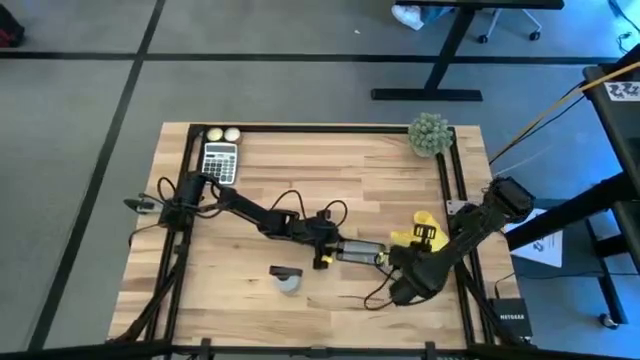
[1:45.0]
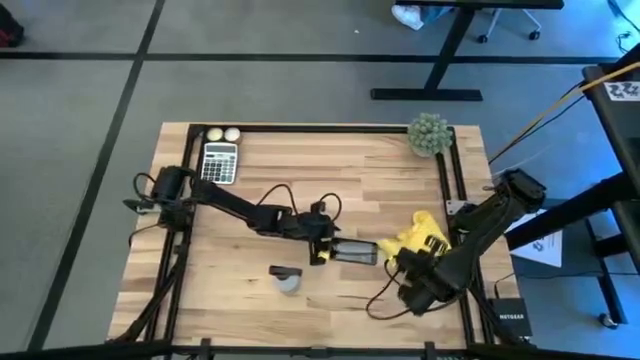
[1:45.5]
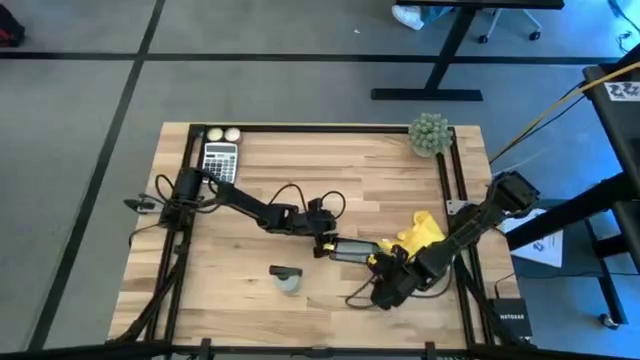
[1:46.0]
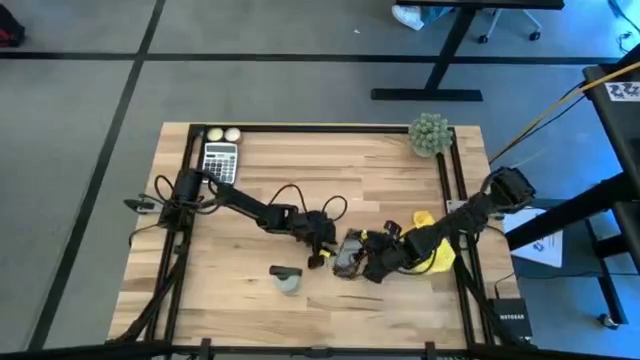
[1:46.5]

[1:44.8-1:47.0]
Task: Apply microfiber cloth
Adjust the black cellphone on the table

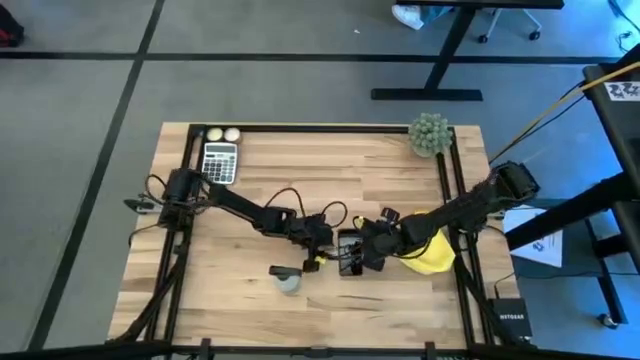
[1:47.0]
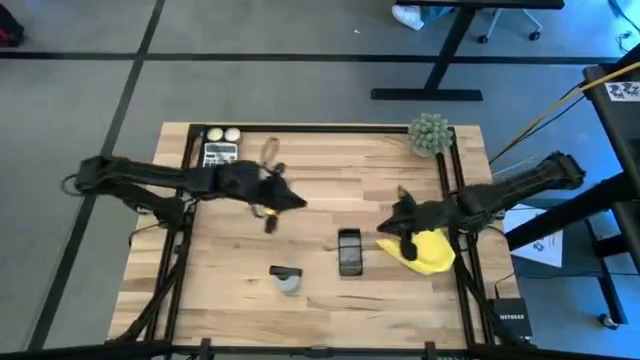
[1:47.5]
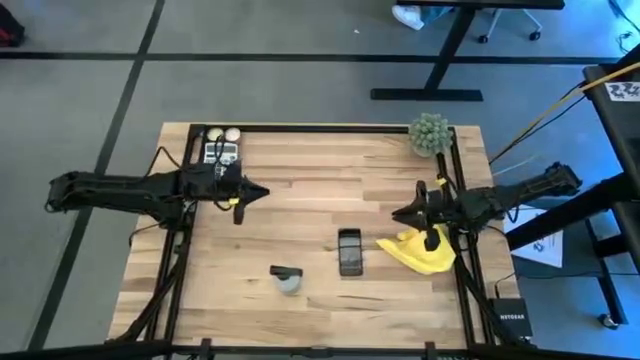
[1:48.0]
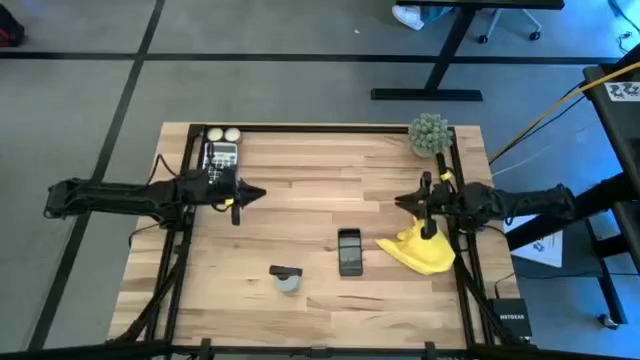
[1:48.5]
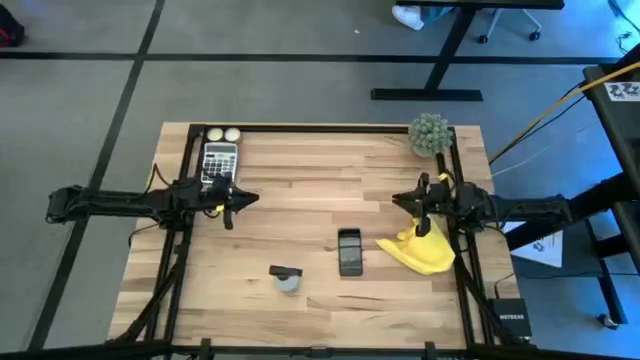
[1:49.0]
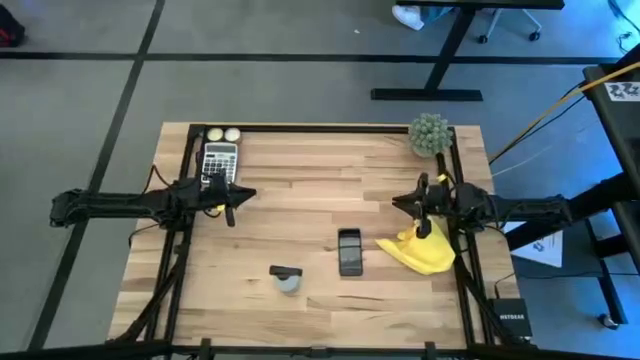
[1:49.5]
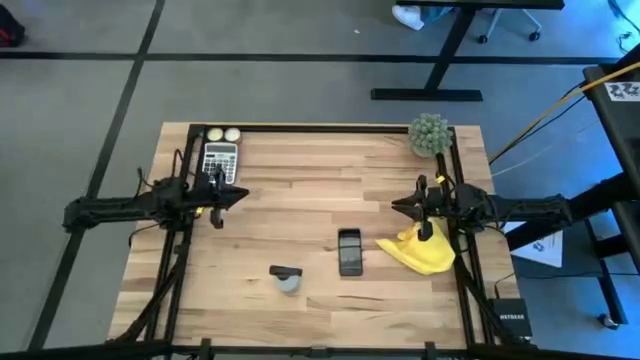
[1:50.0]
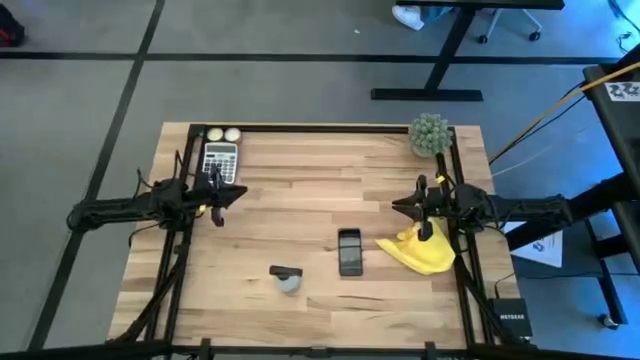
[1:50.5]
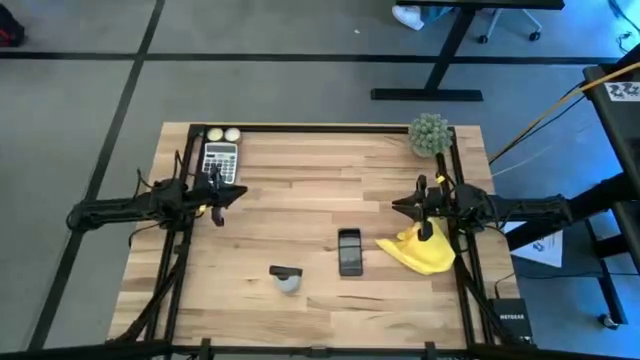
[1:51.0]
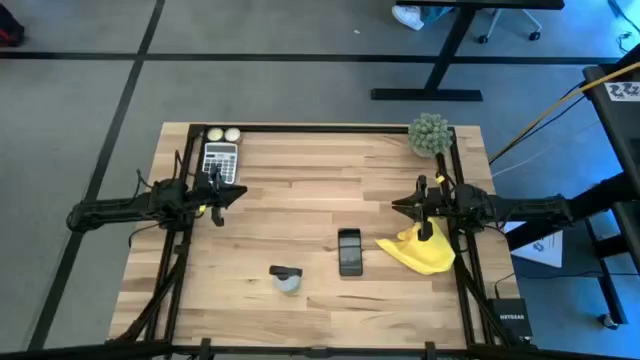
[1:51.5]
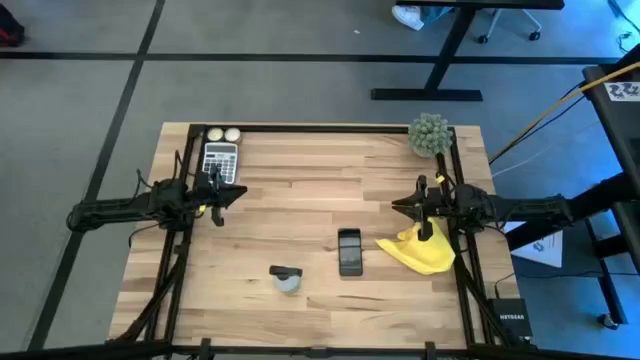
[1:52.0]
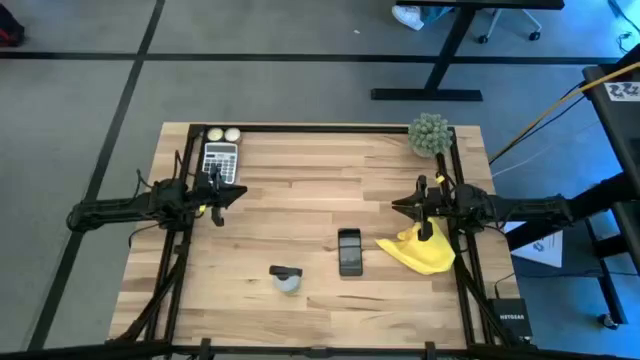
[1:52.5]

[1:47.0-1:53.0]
Return to Home Position

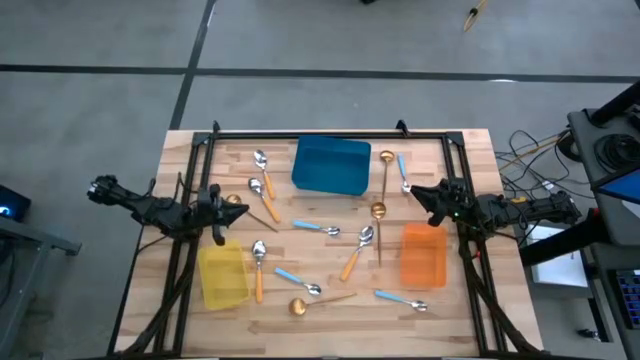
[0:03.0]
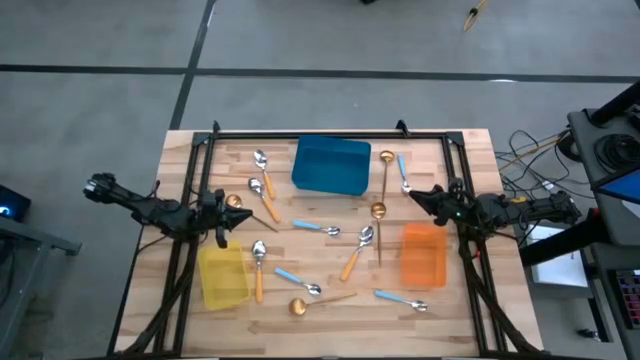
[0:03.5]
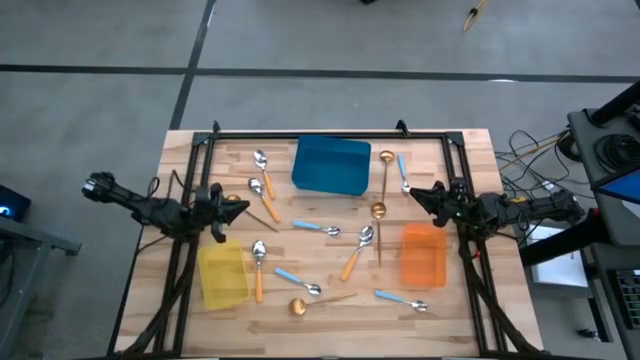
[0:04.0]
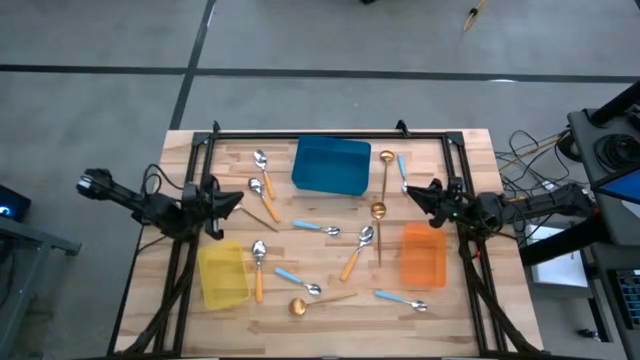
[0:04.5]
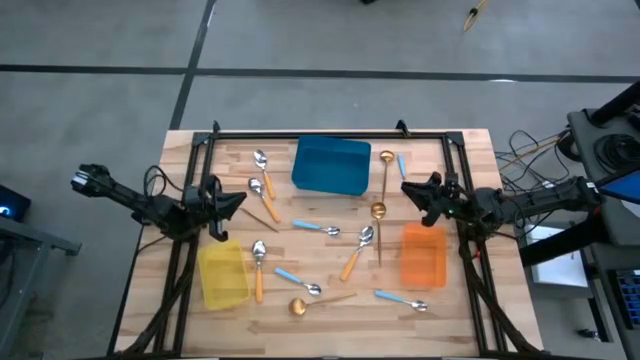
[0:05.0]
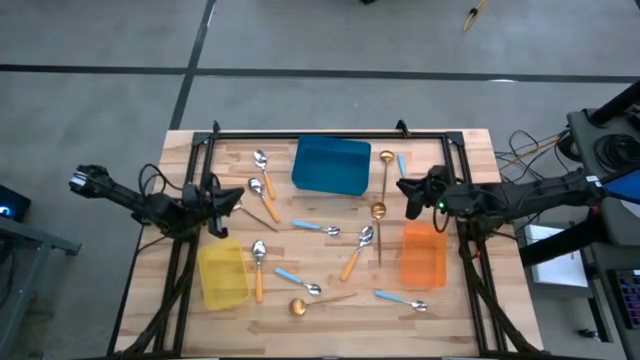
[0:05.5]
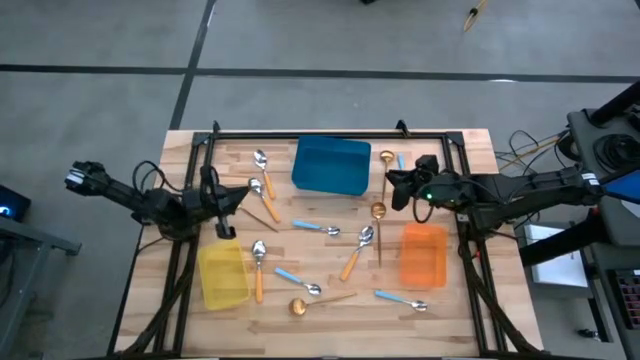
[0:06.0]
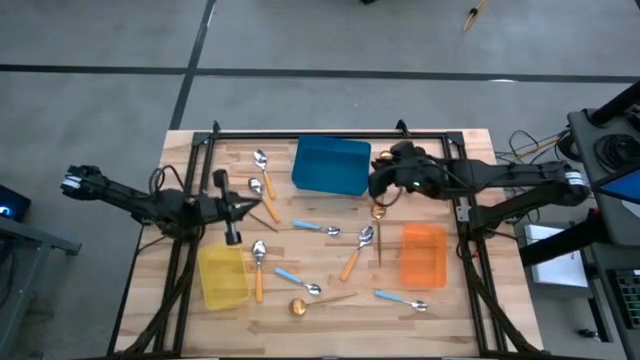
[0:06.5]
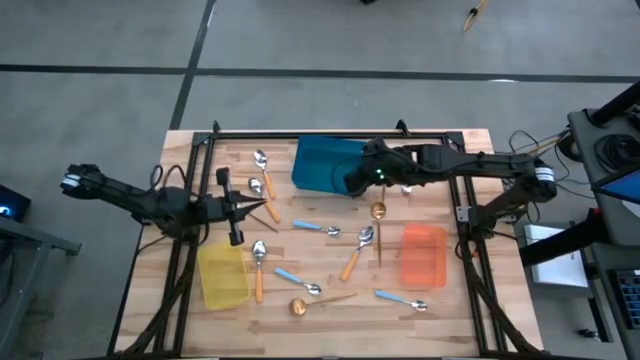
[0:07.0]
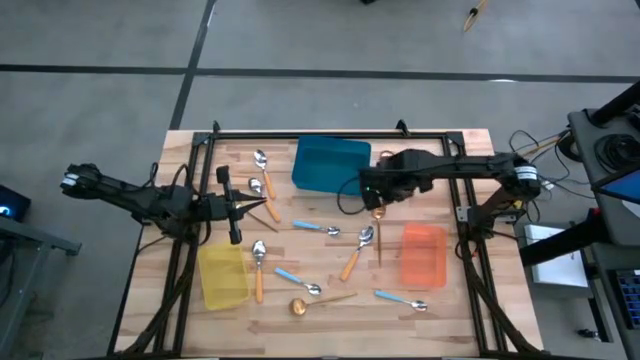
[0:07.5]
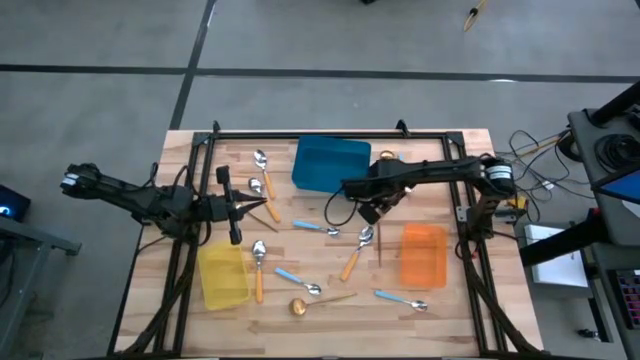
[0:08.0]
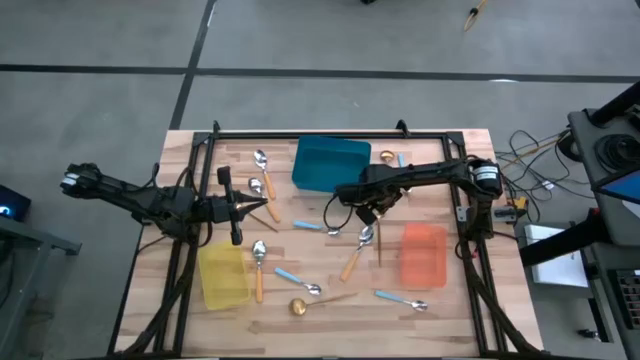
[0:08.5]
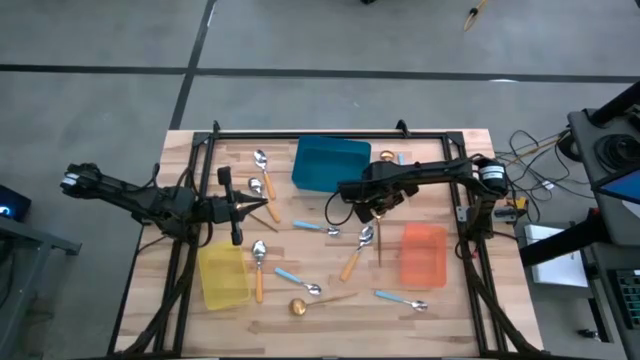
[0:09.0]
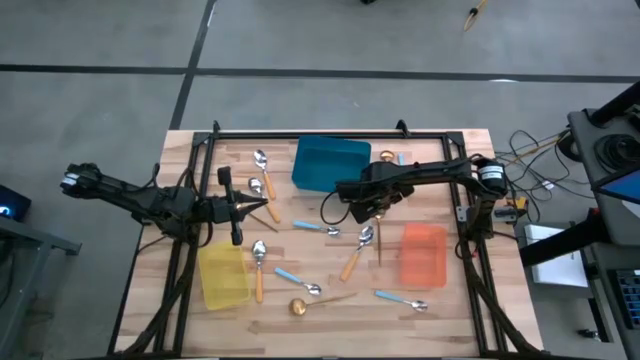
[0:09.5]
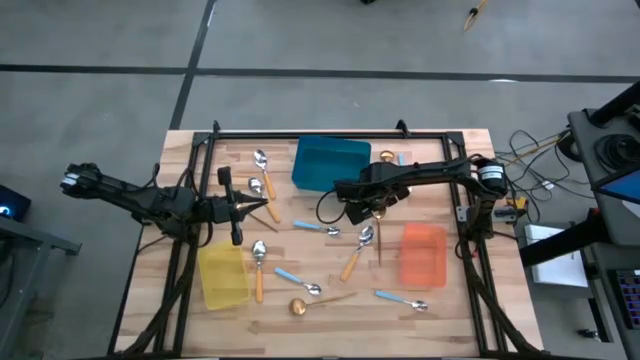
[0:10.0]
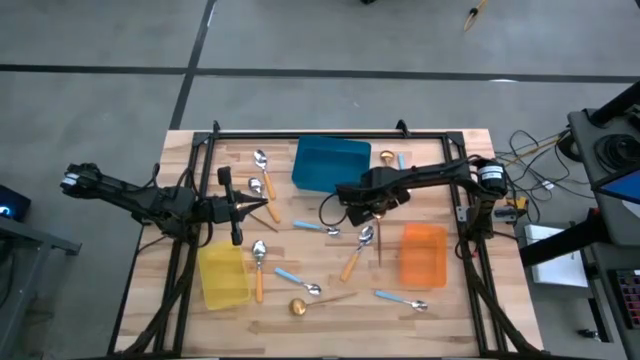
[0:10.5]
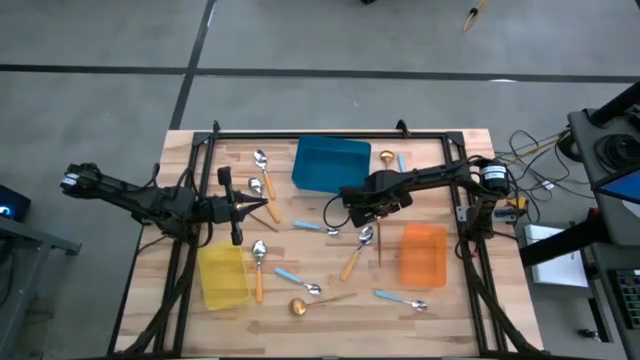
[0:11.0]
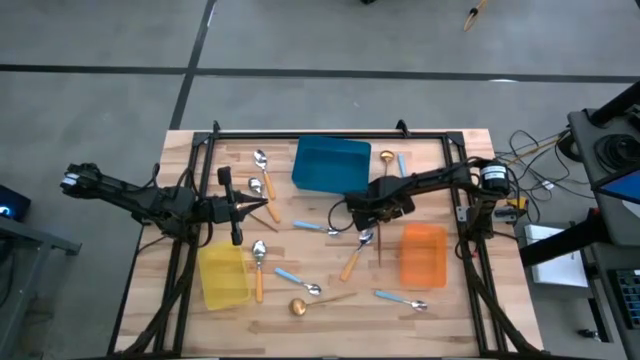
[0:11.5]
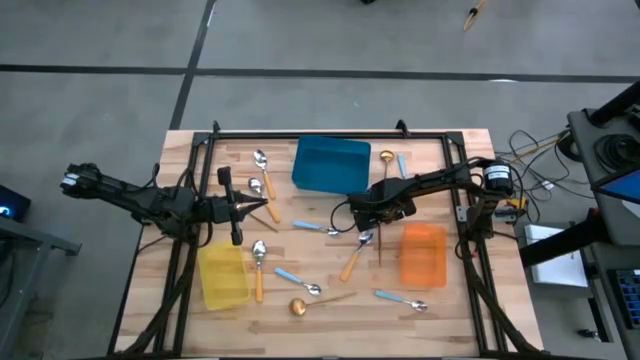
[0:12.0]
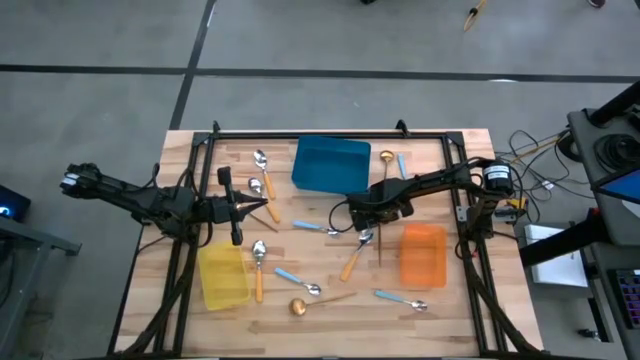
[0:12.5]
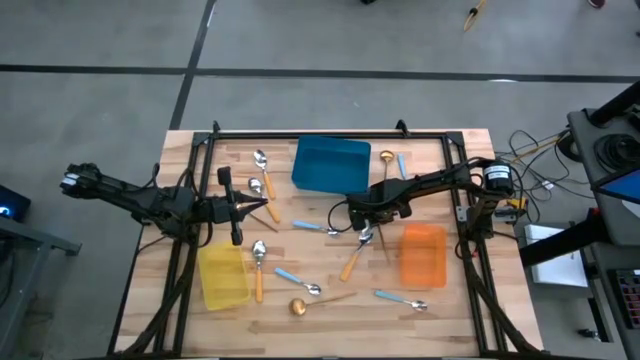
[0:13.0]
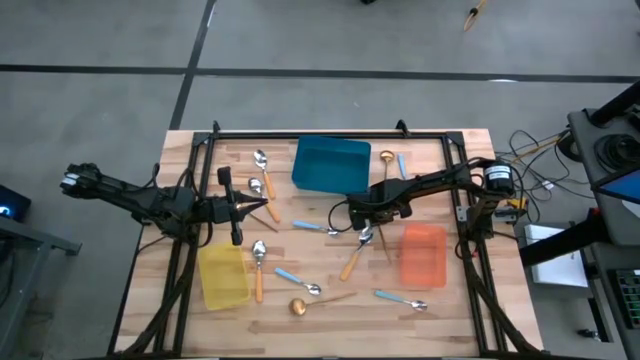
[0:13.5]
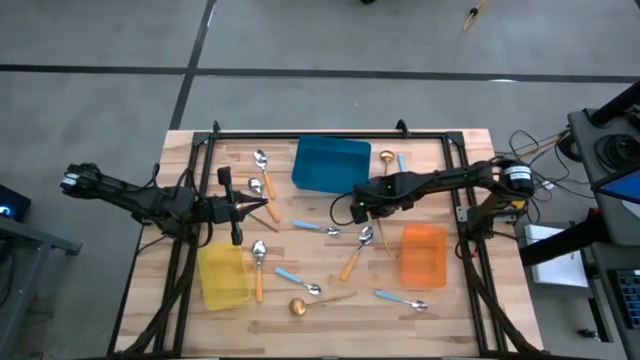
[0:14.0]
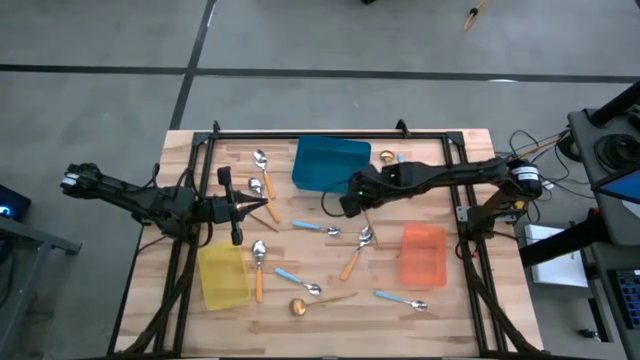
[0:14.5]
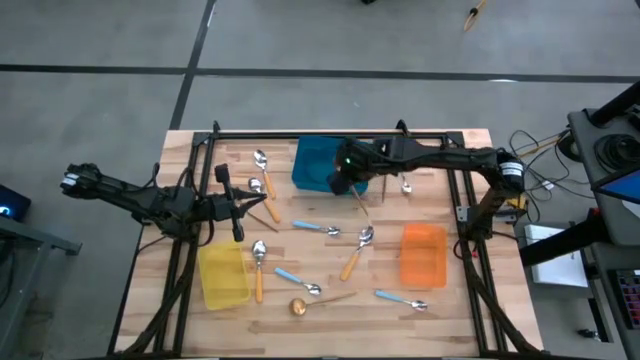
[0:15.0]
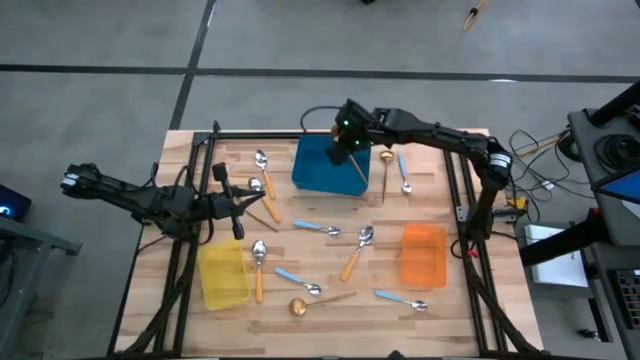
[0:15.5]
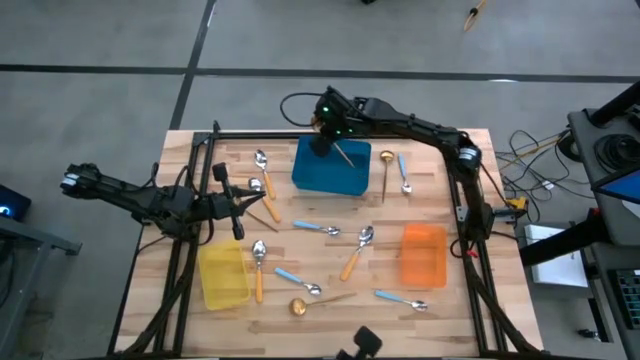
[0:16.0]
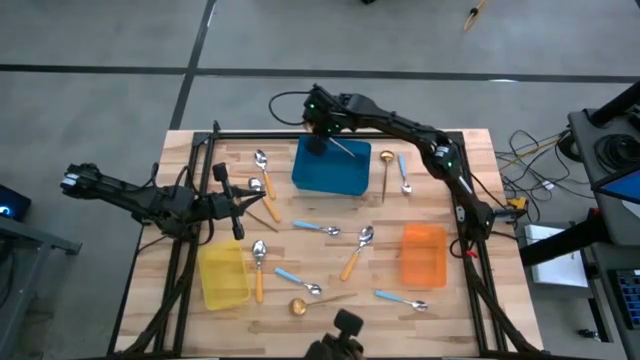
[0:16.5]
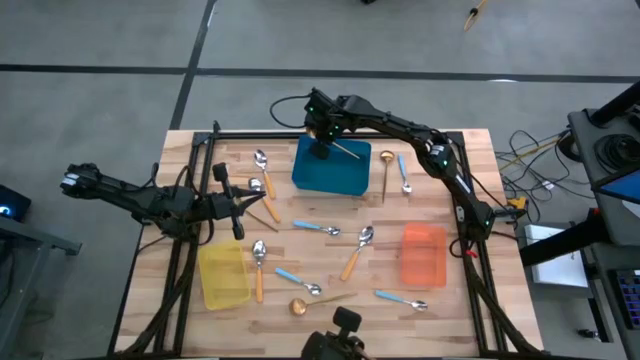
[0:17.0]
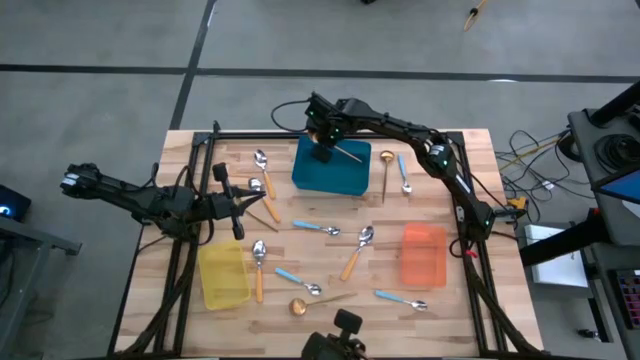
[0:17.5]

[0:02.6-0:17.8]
Task: Sort silverware by color (type)
Put the gold spoon into the blue bin
